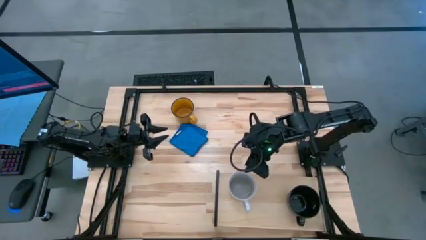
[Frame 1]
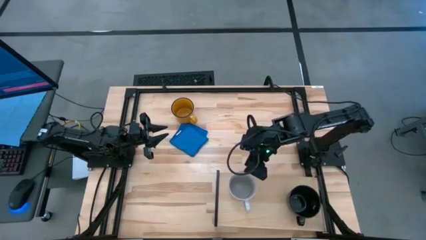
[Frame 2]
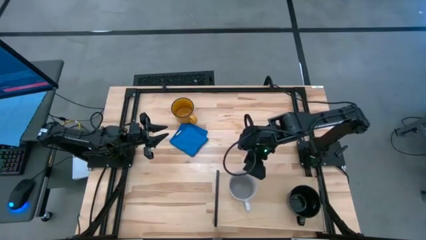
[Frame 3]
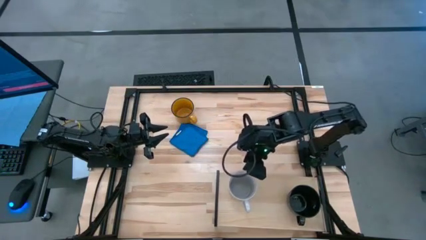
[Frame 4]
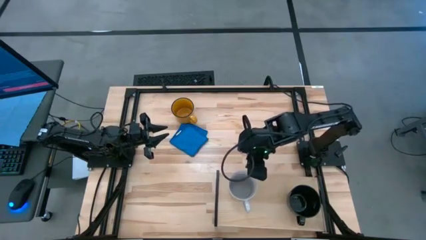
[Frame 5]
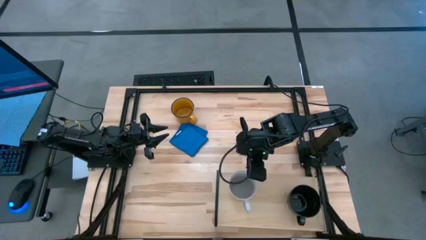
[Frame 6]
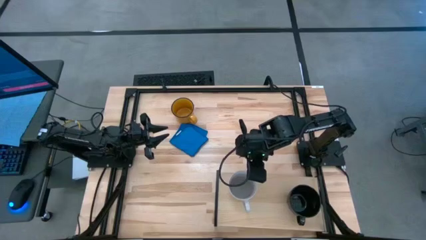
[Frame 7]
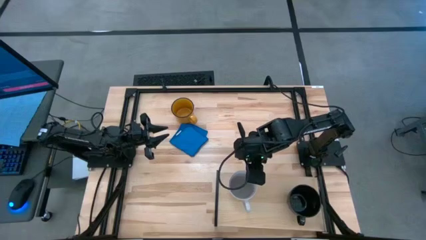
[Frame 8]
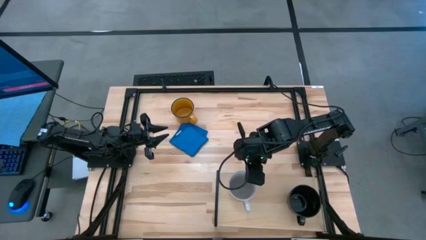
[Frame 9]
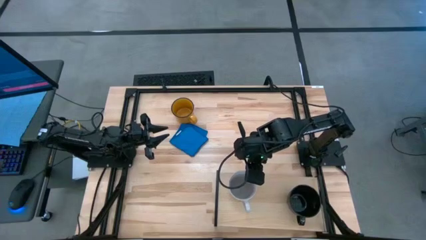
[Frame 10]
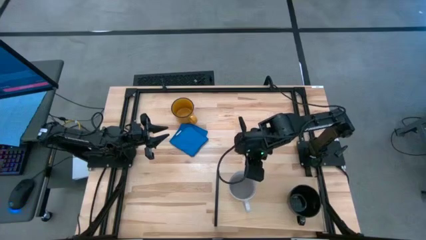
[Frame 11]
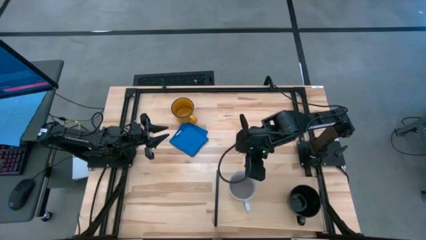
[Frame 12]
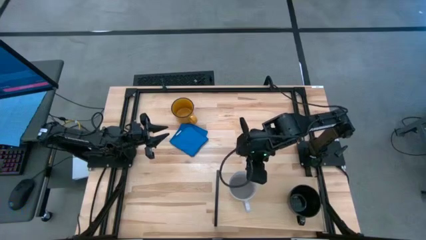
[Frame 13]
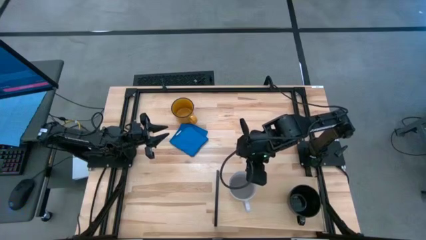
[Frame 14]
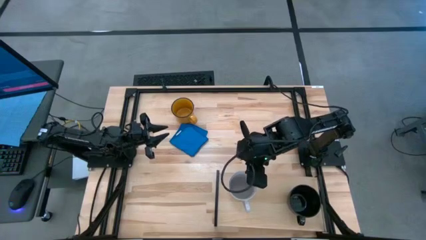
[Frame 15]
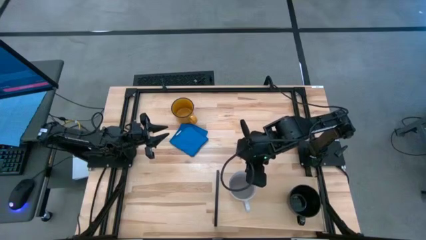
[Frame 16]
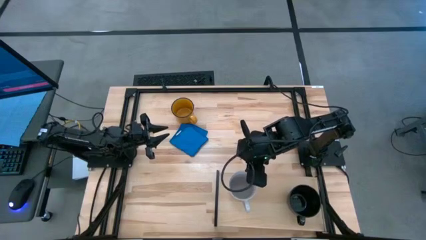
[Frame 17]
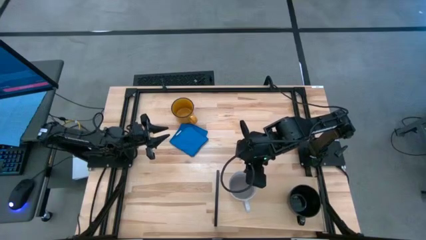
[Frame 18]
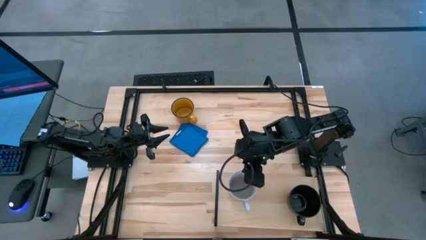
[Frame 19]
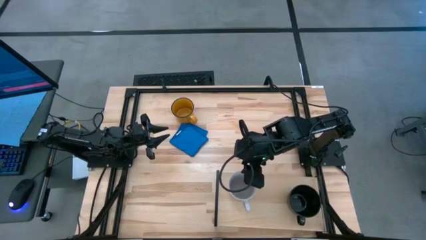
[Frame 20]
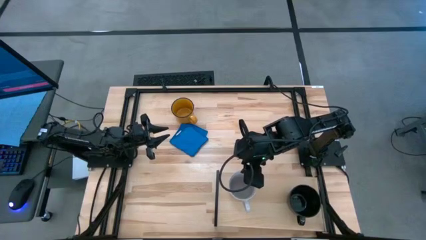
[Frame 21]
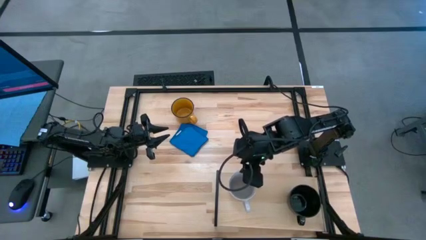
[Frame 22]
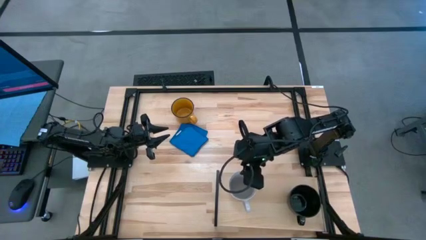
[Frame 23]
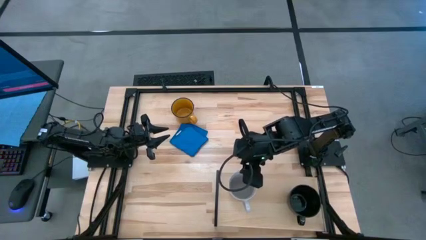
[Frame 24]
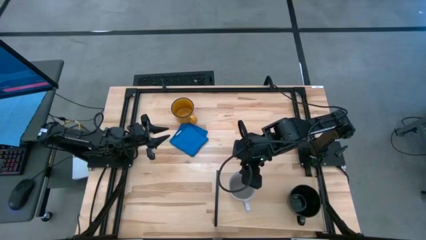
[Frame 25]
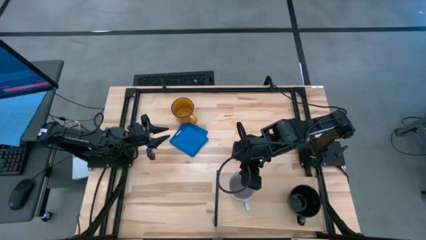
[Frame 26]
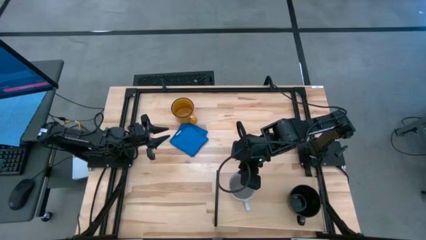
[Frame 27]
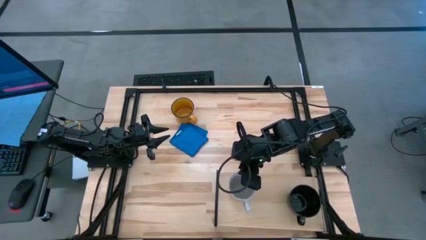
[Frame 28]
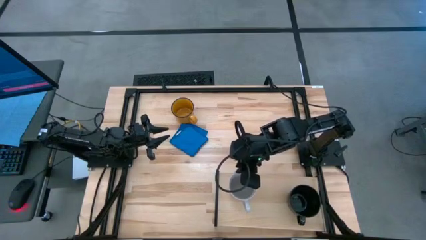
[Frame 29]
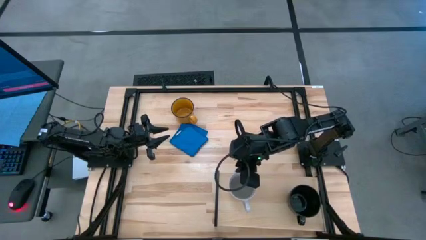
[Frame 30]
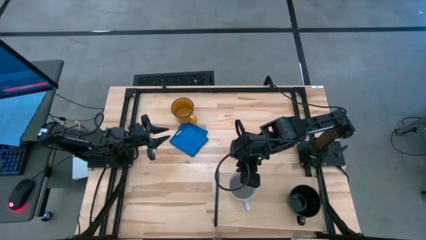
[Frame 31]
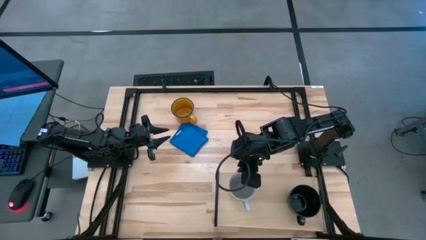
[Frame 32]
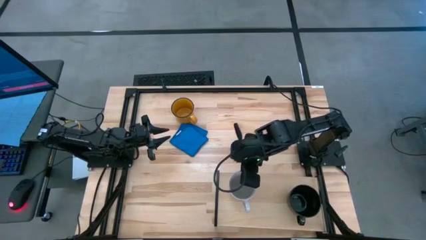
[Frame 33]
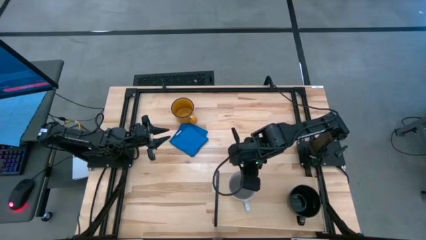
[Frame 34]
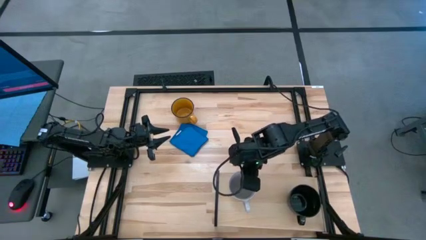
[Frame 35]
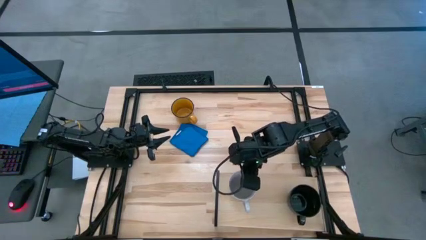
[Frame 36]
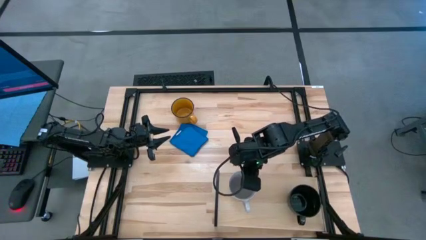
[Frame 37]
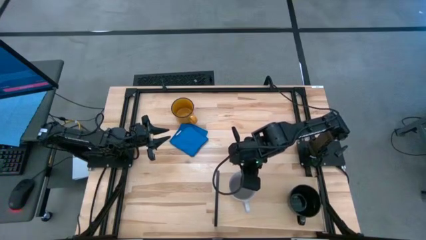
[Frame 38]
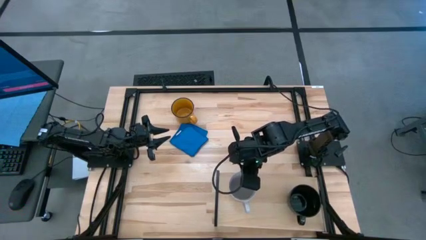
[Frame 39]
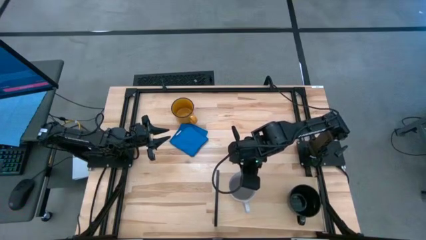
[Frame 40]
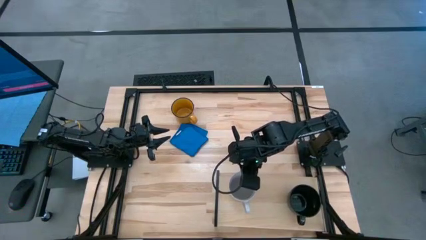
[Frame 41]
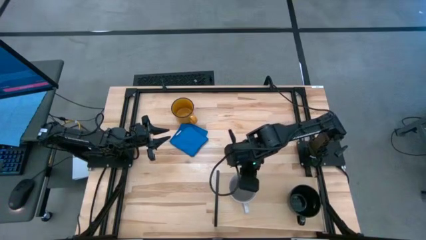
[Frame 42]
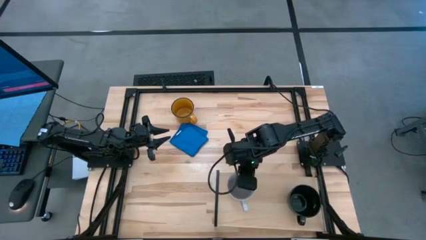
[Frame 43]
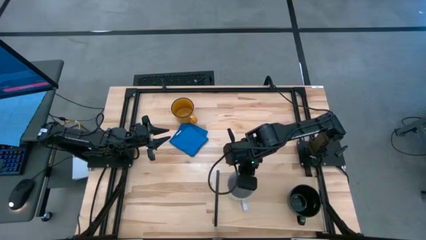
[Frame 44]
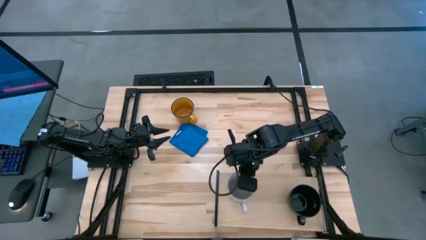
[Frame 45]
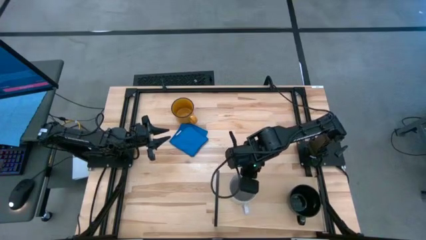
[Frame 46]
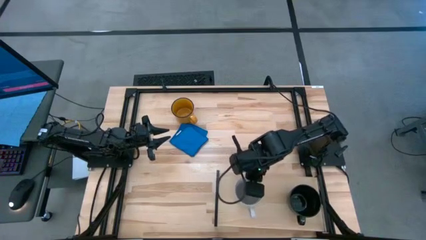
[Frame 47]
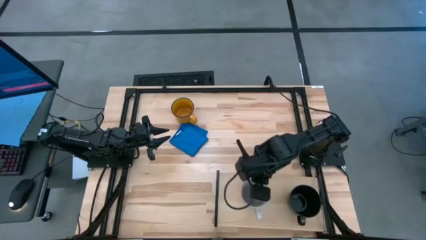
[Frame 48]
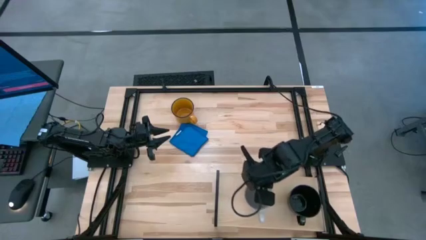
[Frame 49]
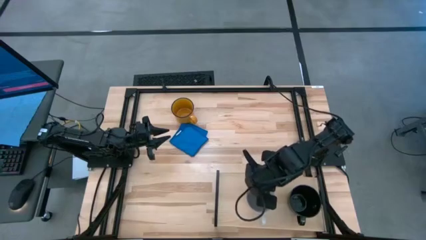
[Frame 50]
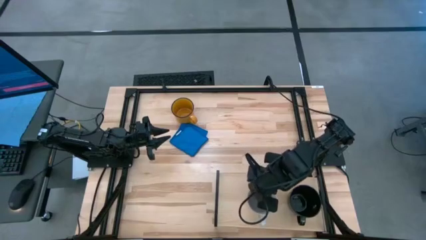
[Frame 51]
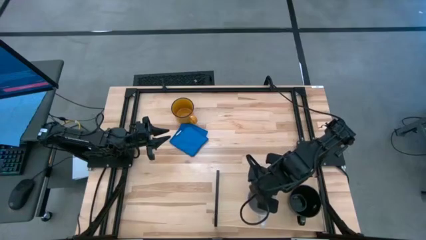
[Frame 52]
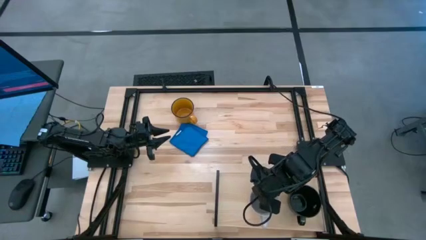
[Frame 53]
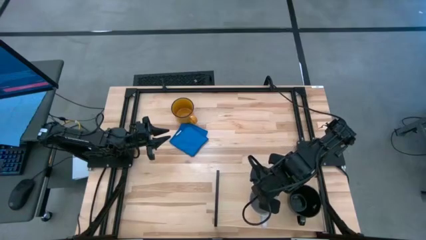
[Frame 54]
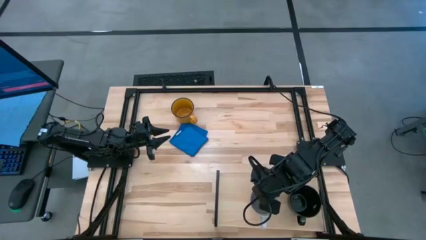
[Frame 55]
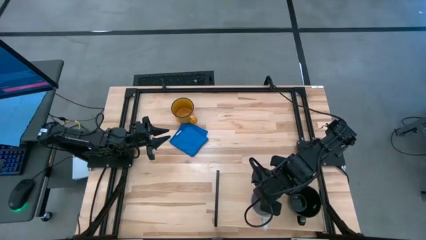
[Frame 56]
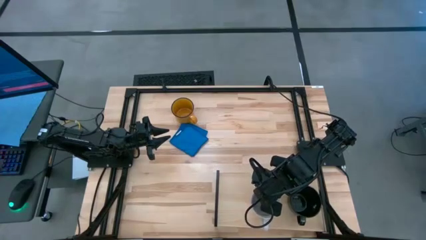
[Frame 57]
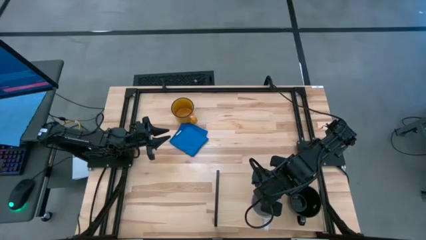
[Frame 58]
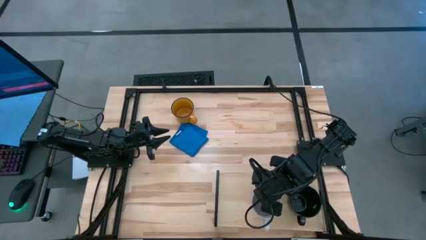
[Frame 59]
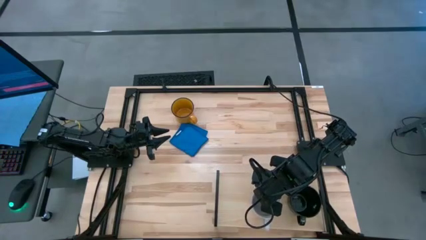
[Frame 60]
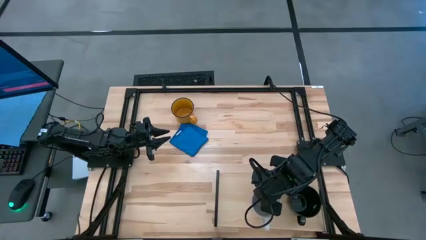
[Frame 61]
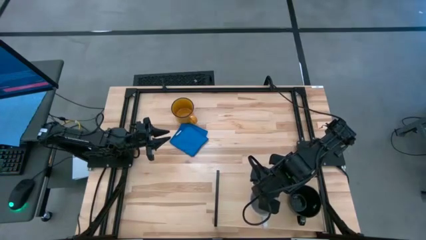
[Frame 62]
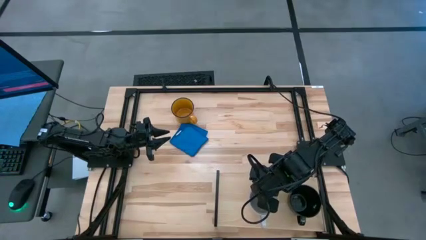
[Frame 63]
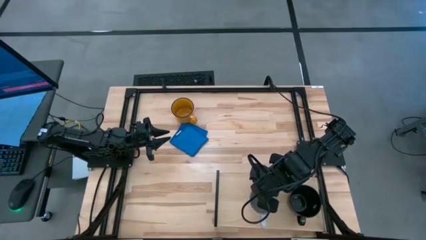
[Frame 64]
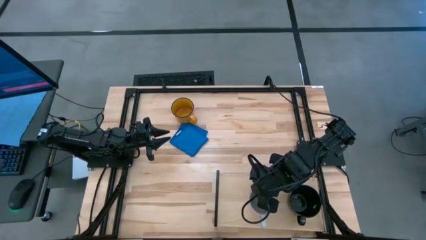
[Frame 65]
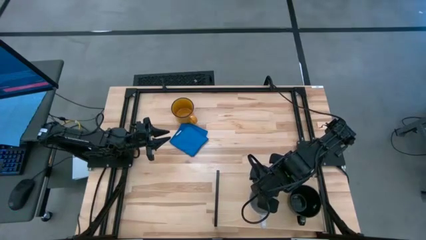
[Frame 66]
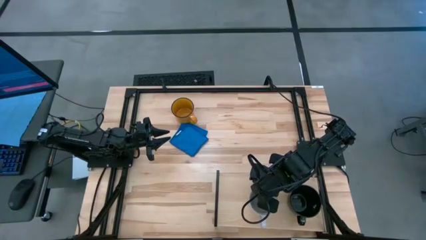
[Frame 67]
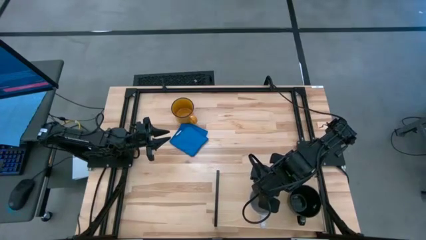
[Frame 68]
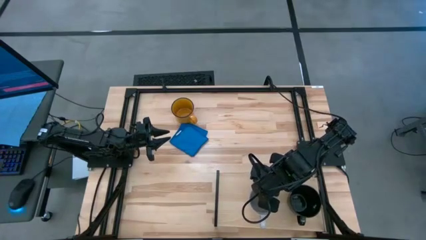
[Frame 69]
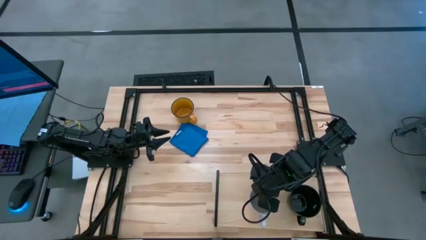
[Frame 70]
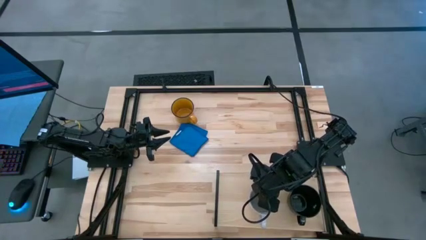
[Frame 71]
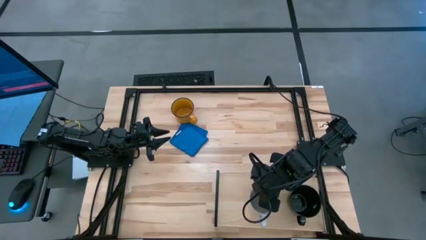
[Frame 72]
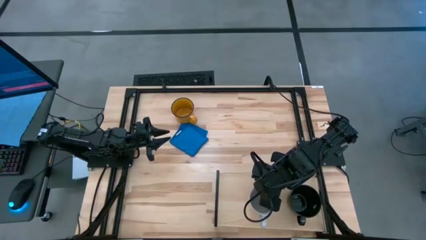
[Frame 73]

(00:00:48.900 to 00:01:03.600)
Task: Stack small to large cups/mugs on shelf
Put the gray mug on the shelf
